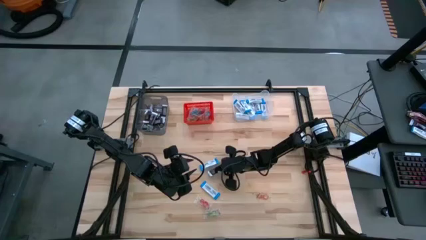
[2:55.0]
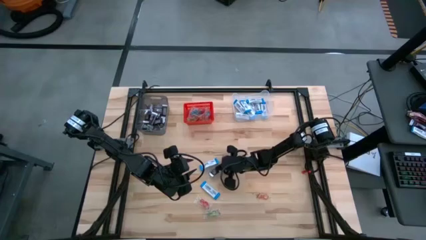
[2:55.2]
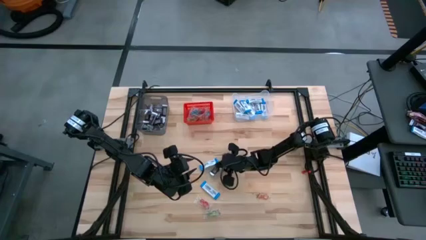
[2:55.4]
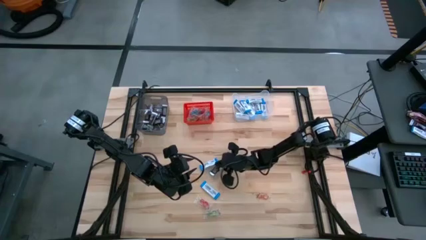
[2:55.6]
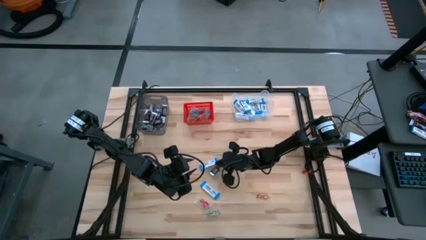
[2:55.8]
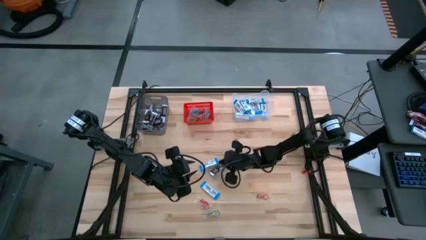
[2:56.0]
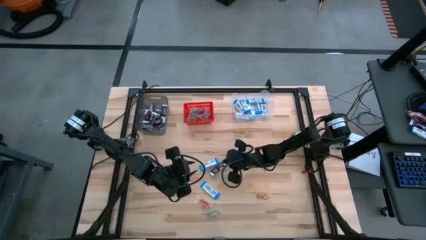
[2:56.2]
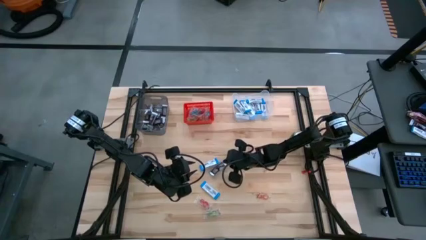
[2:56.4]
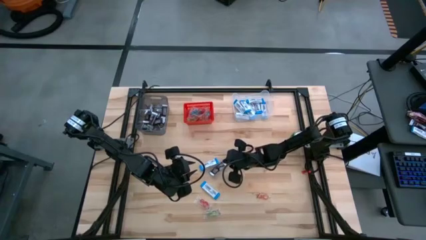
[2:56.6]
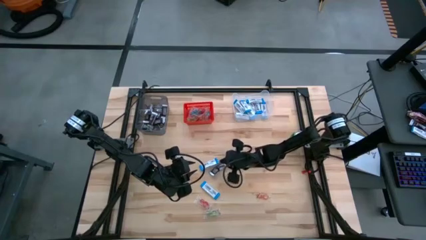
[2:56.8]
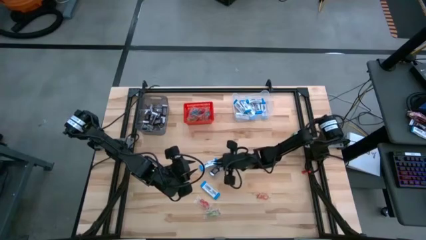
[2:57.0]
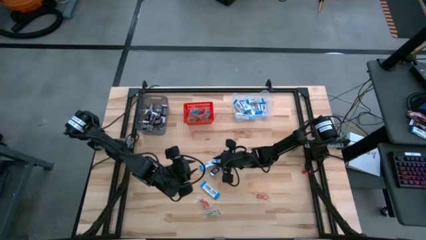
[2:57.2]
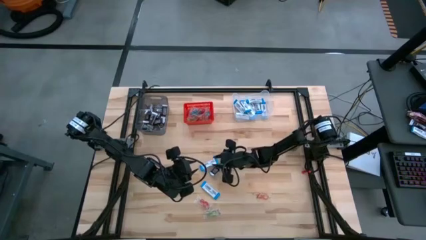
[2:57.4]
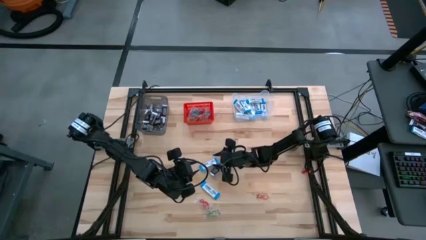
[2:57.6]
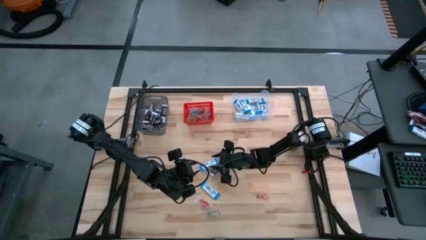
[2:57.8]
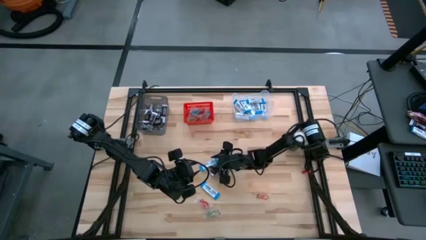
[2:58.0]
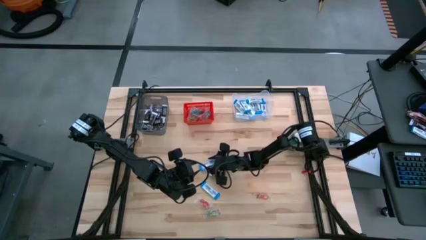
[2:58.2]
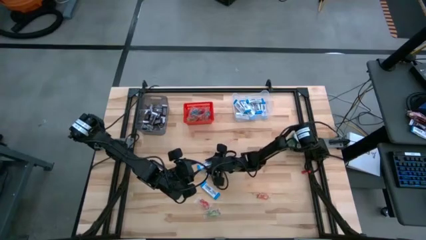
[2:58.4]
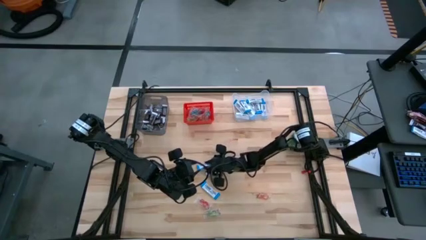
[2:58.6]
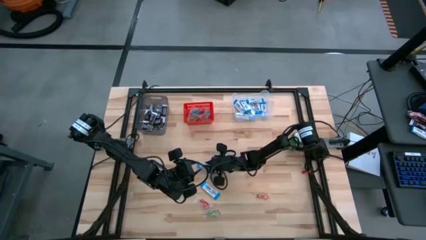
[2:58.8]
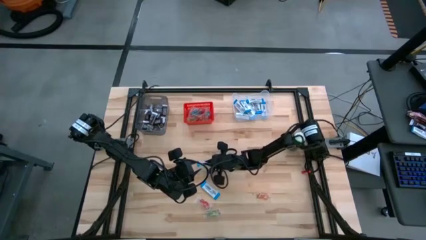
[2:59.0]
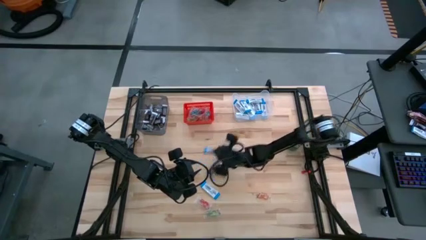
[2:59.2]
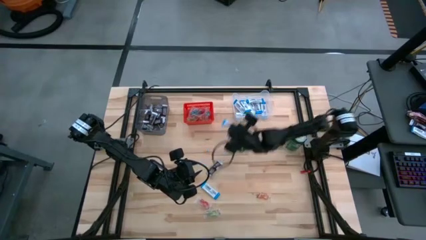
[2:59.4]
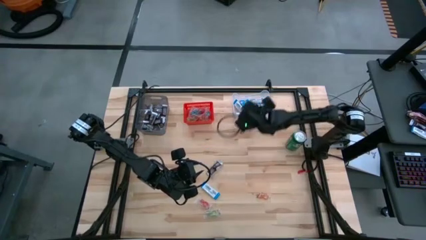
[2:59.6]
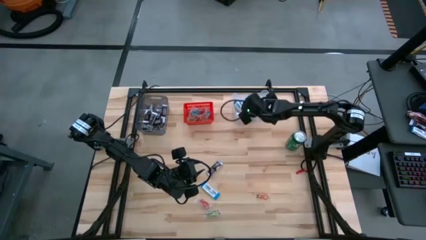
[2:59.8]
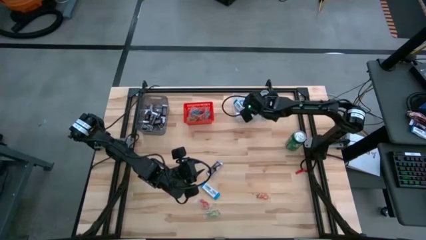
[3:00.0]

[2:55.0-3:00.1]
Task: Sort candy
Put the white chocolate into the transparent bin

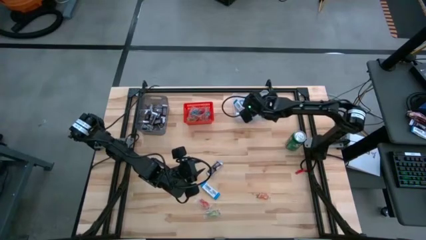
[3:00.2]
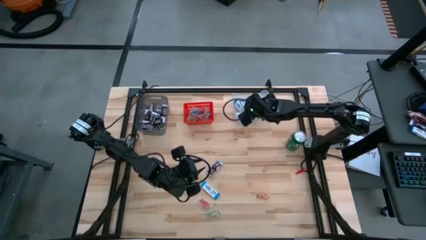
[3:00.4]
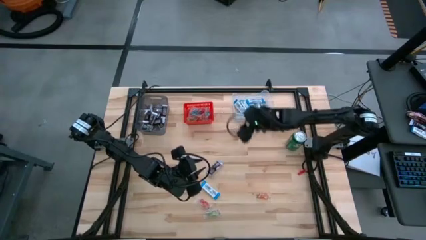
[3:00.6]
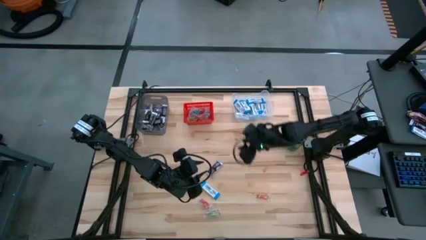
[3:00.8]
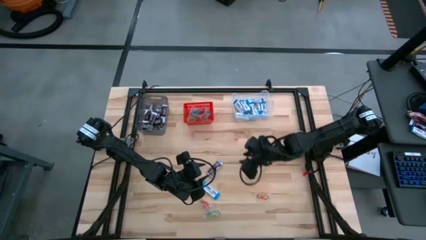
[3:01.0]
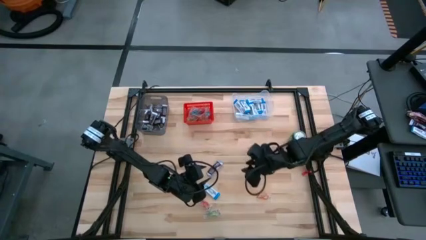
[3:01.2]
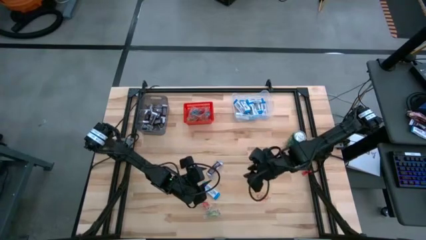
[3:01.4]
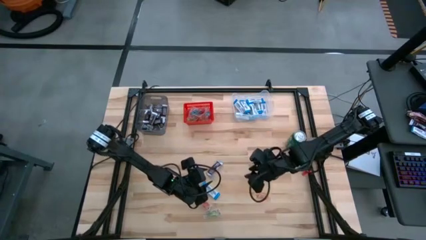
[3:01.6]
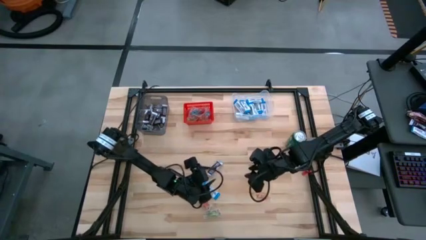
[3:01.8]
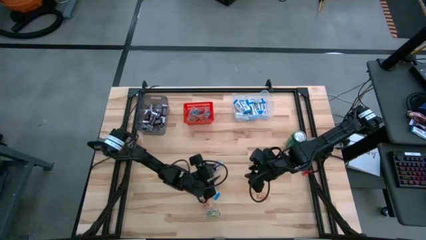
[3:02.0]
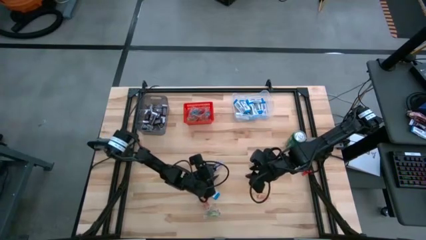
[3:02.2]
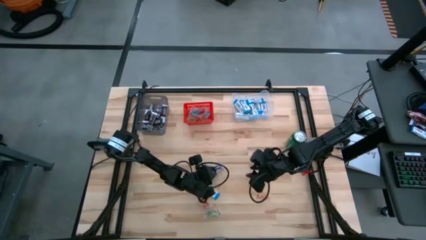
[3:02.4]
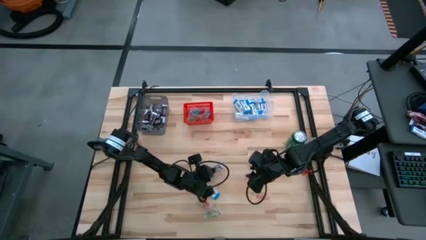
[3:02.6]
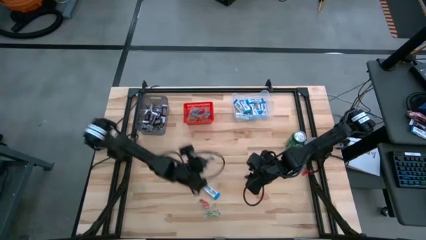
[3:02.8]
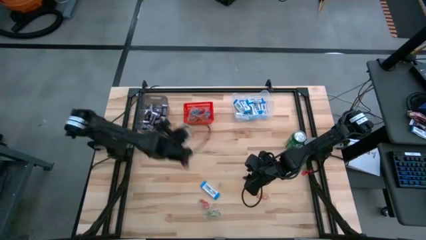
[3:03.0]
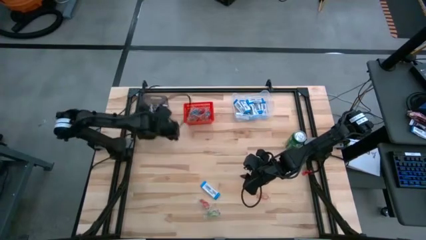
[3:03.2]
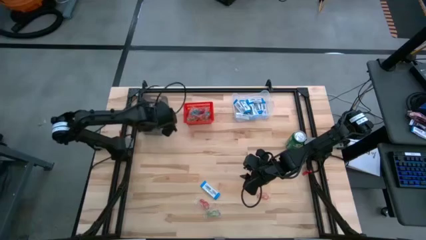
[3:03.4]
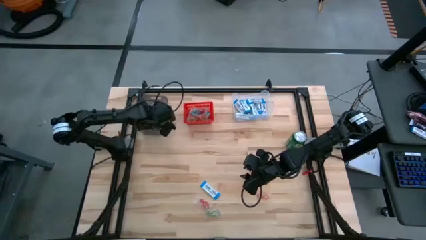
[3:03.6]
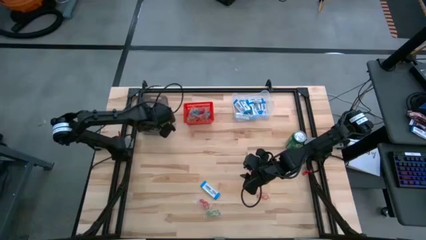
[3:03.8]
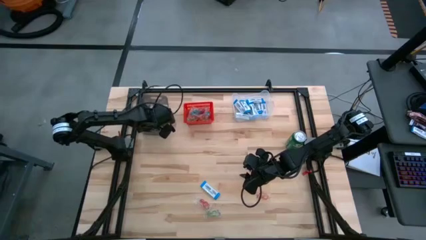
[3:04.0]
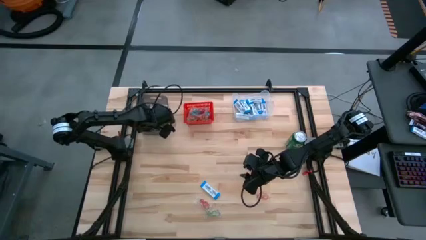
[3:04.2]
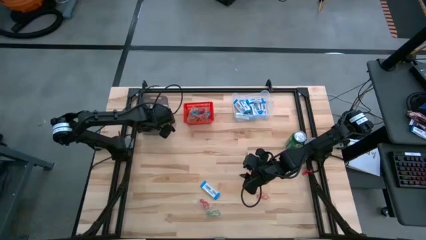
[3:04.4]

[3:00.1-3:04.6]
Put the brown chocolate into the black bin

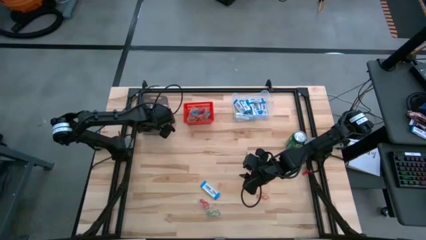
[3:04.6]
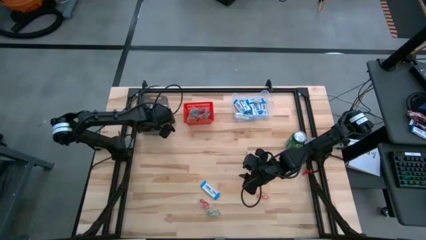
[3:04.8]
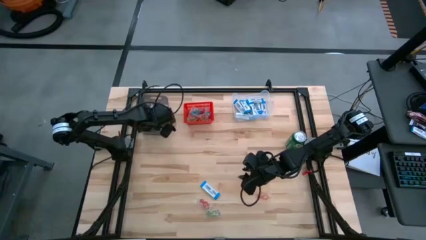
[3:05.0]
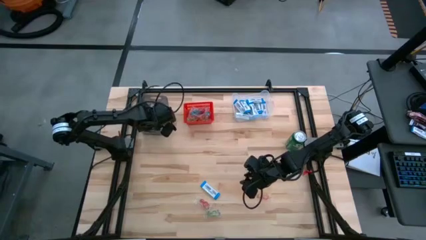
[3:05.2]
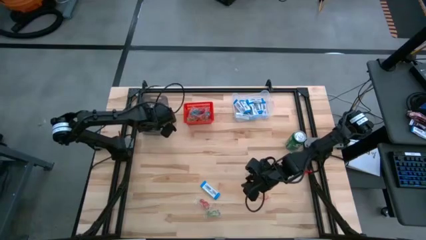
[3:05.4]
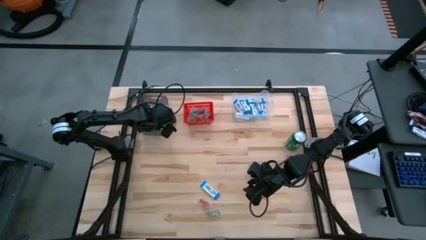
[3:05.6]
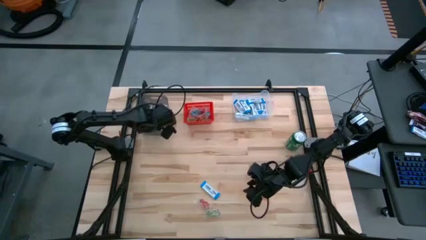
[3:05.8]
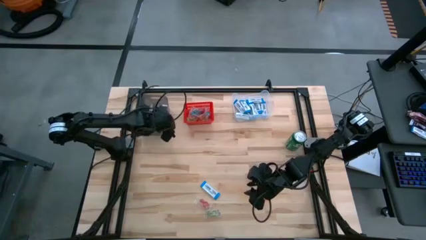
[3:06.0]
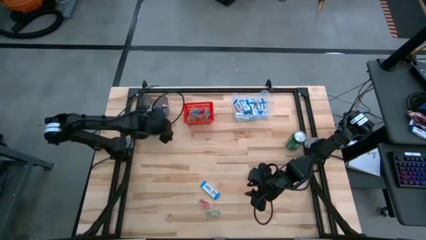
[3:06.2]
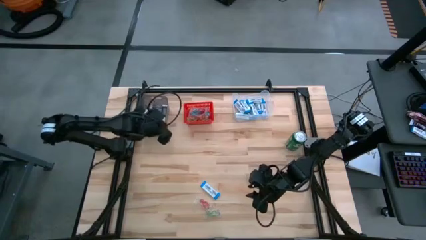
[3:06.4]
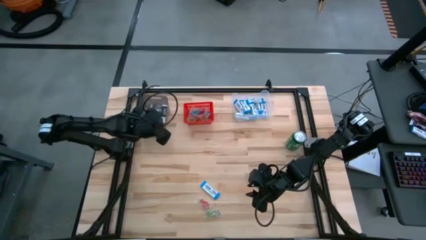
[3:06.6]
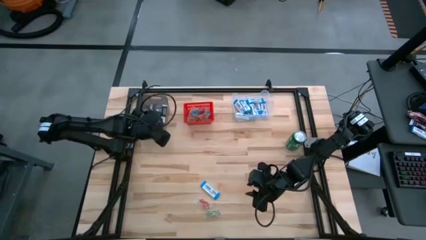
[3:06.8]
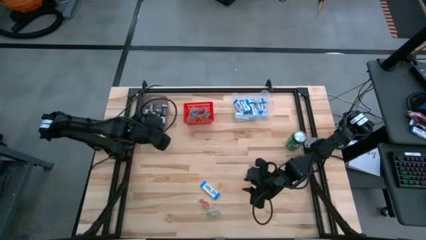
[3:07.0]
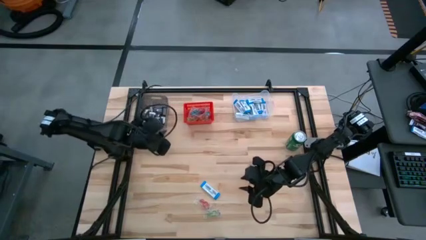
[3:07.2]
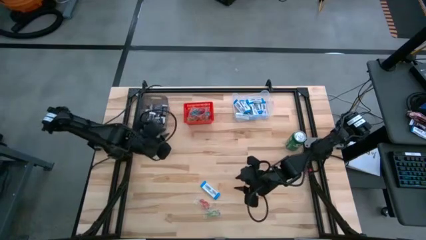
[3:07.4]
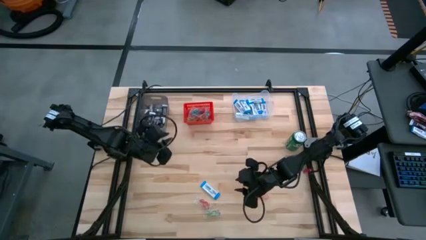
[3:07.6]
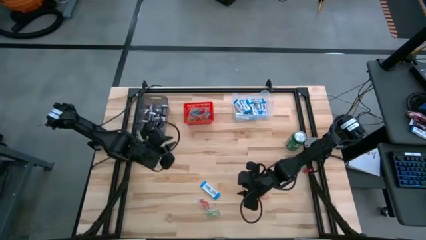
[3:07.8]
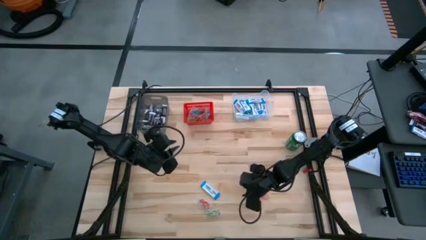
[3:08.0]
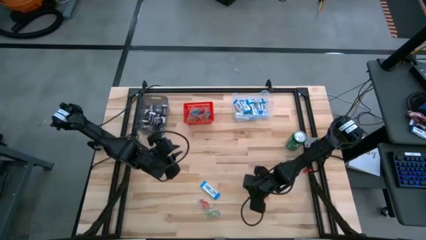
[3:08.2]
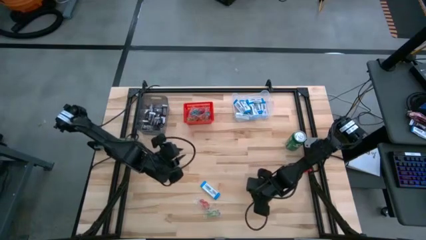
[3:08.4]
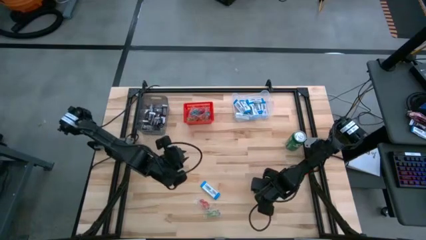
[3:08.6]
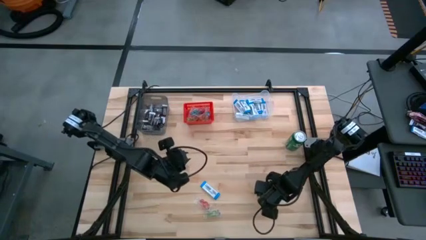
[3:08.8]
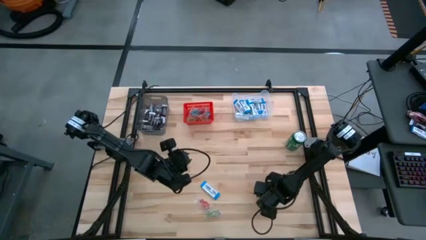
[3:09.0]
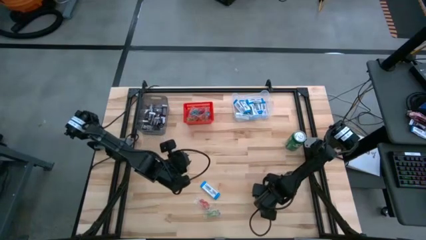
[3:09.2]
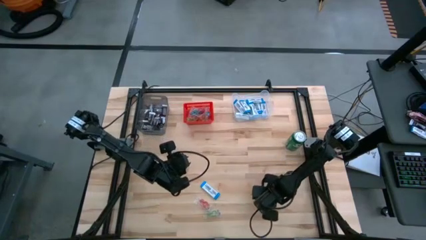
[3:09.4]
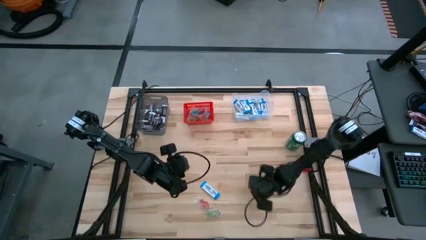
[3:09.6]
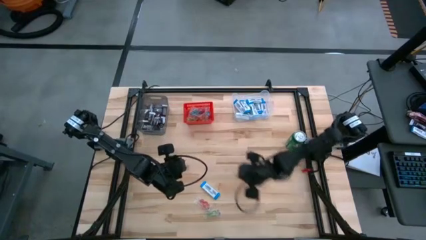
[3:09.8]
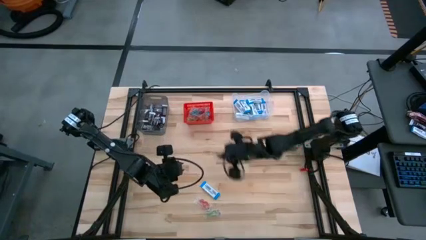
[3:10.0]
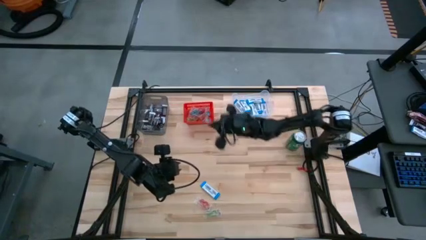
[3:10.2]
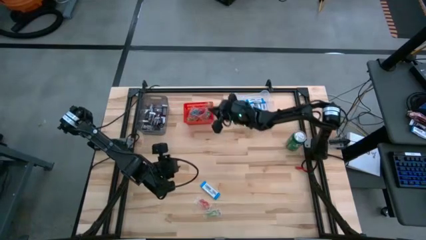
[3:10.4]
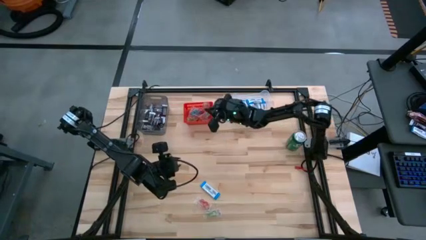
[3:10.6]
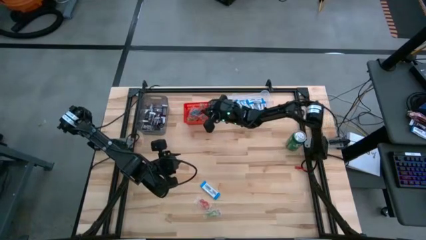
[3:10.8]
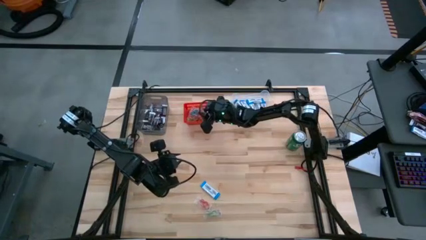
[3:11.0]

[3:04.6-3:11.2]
Put the orange gummy into the red bin

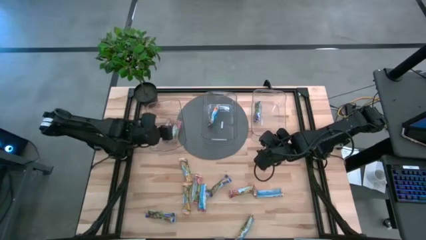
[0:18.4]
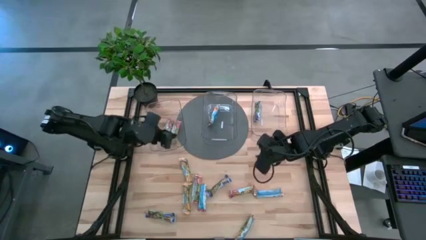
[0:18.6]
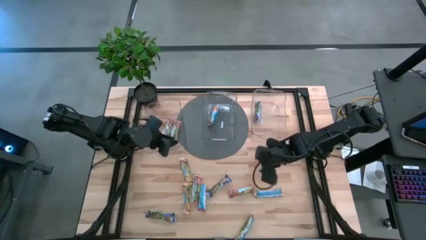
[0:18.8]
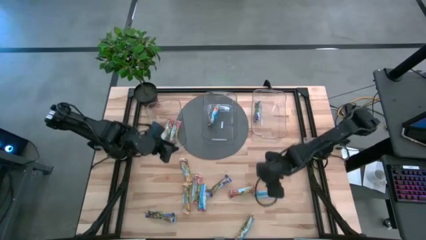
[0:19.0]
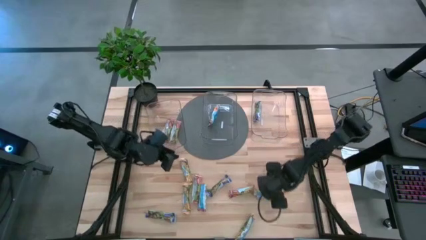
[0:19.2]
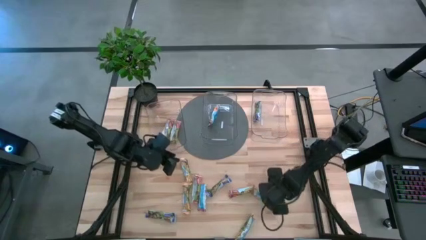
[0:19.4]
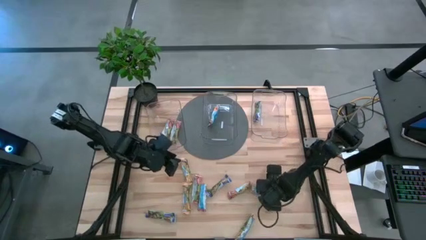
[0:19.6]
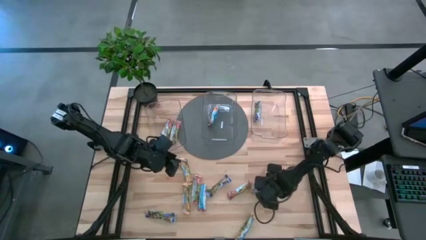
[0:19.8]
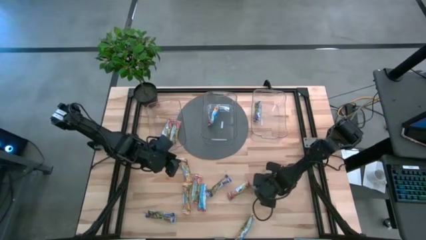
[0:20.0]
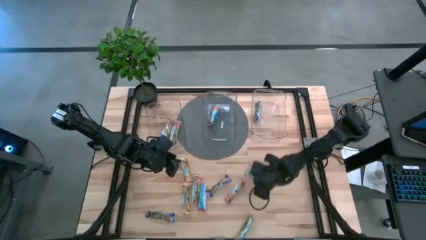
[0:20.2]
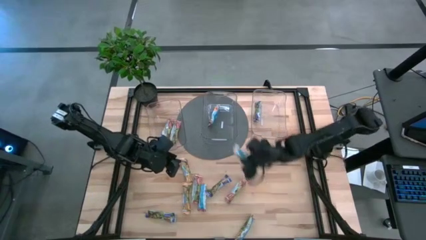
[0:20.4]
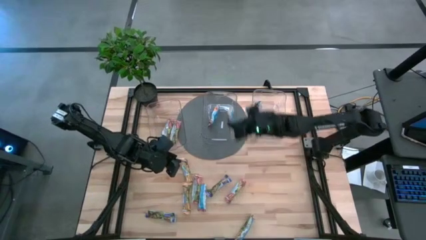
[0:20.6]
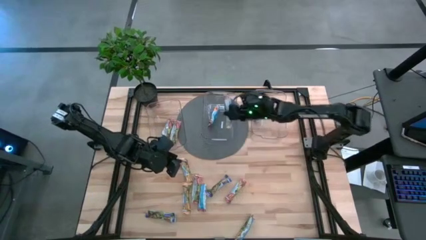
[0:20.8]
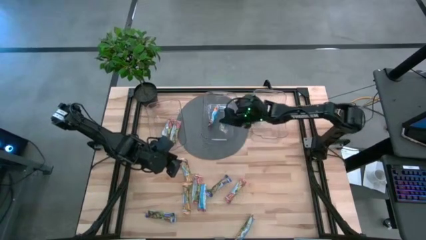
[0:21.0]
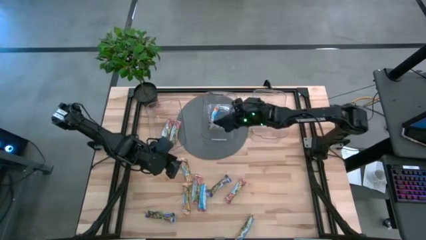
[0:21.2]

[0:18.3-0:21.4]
Task: Pick and place Granola Bars by type
Put the yellow granola bar into the center transparent bin
